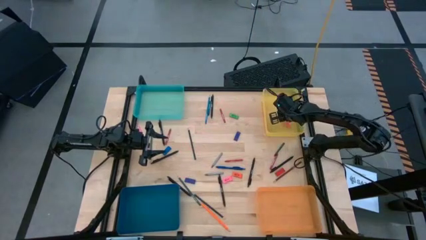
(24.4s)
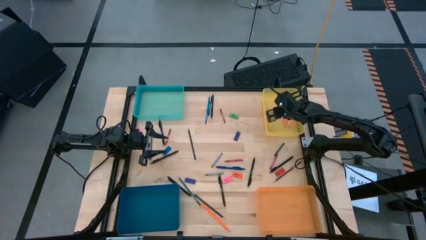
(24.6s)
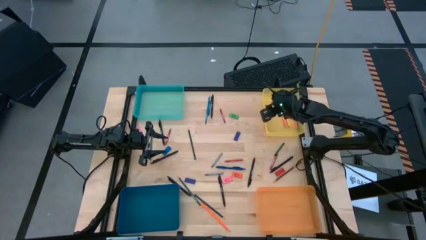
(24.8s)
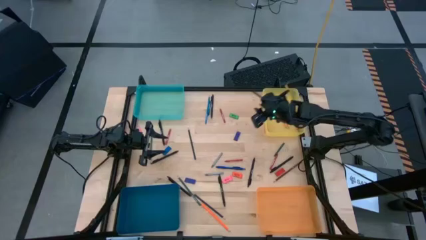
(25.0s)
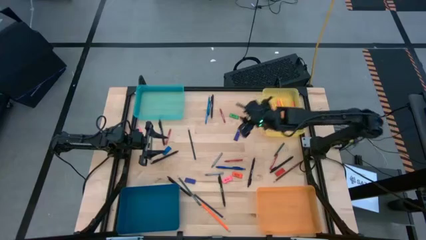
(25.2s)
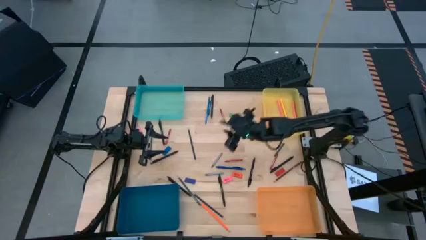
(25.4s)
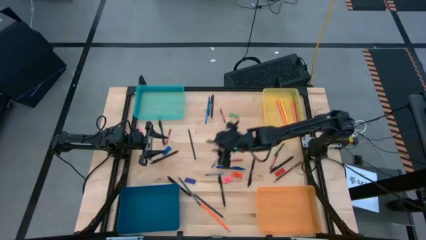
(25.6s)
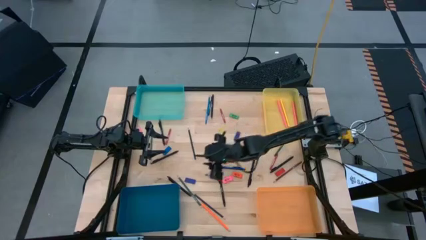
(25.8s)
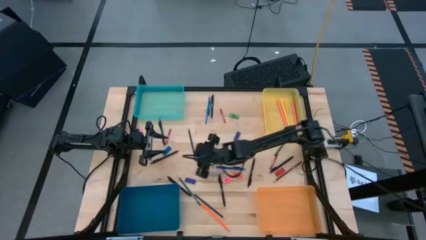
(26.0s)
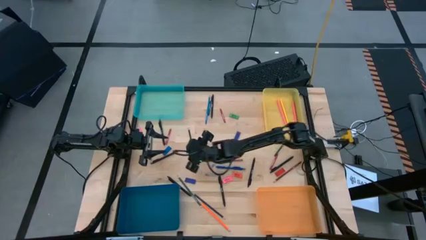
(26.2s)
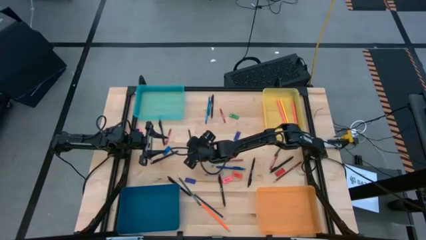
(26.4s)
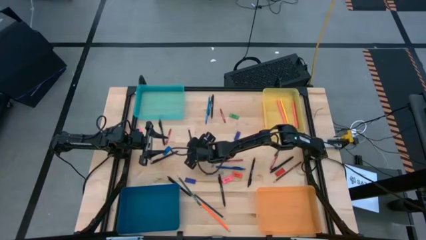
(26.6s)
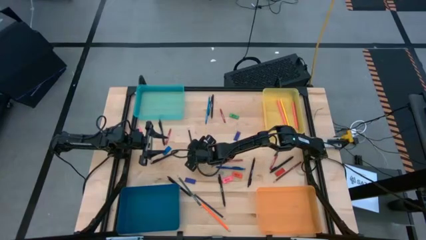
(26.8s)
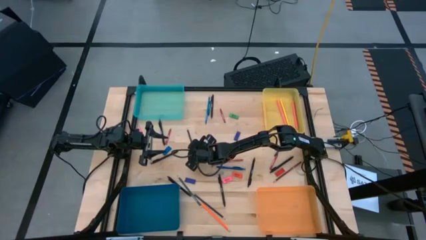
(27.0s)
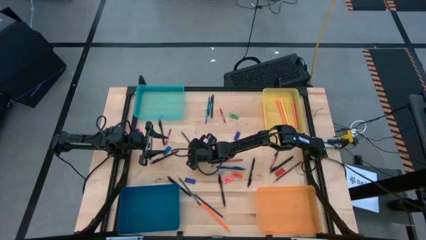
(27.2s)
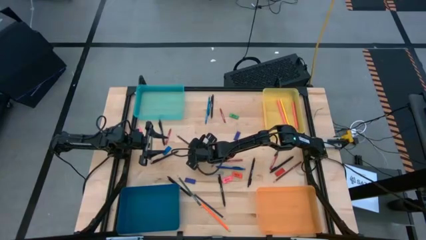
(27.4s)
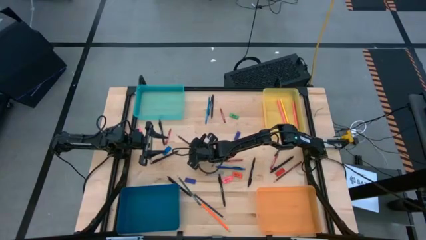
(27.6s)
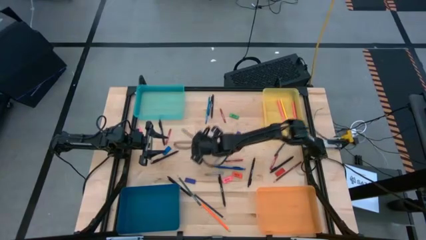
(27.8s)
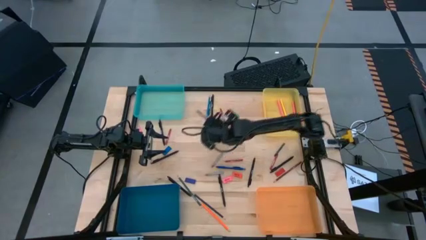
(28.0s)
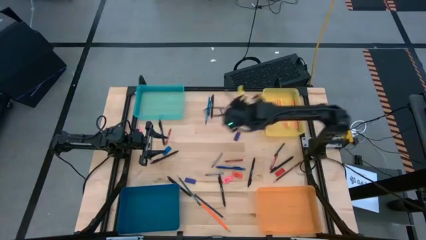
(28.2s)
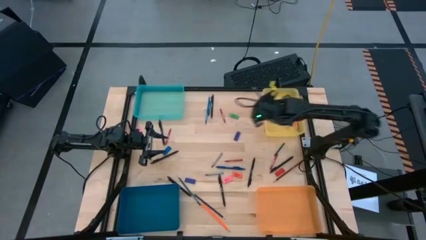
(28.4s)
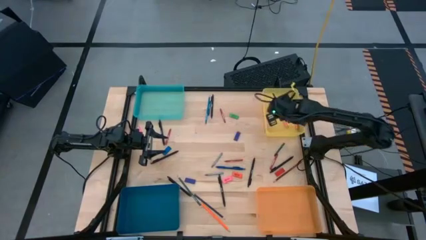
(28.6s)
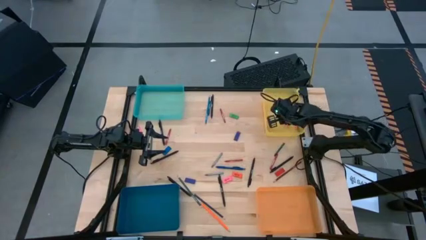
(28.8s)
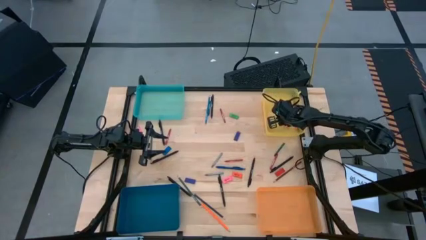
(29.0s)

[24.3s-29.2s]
Task: Sort crayons/erasers/pens/pencils in bins
Put the dark blue pencil into the yellow bin

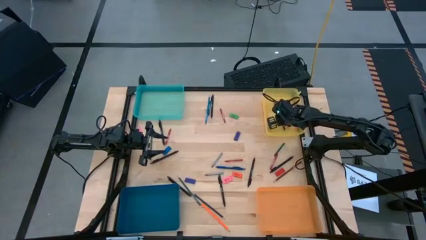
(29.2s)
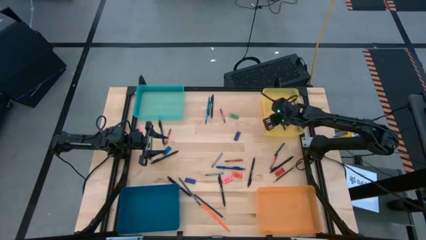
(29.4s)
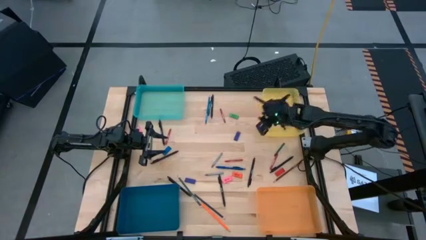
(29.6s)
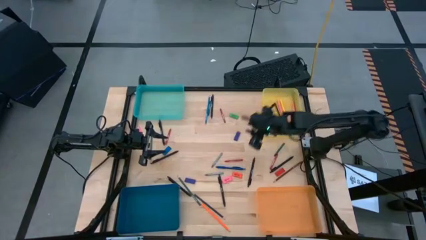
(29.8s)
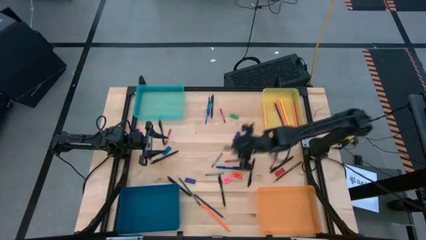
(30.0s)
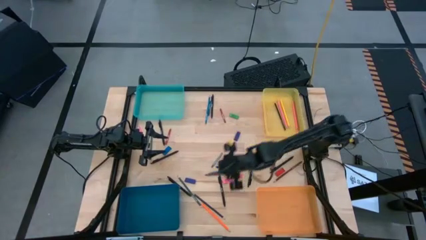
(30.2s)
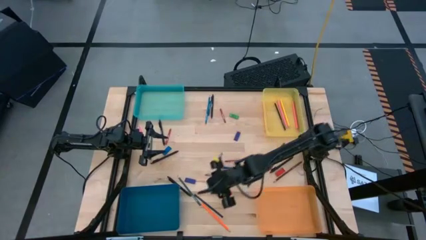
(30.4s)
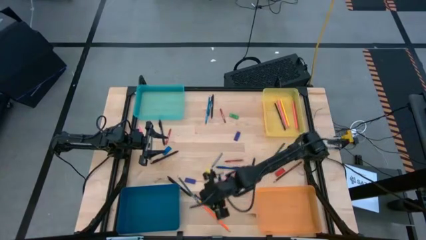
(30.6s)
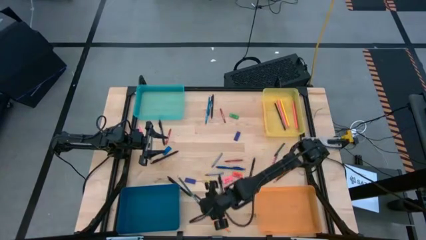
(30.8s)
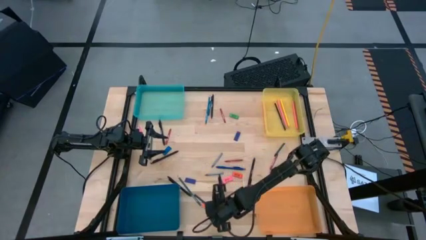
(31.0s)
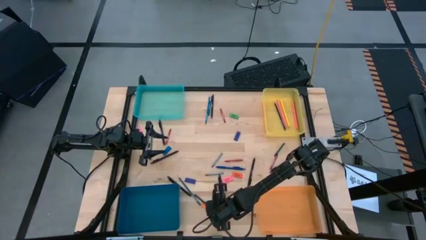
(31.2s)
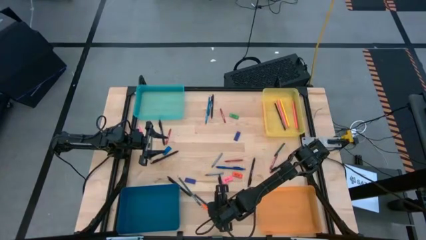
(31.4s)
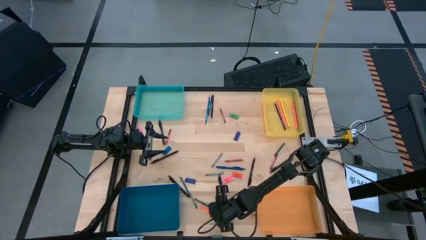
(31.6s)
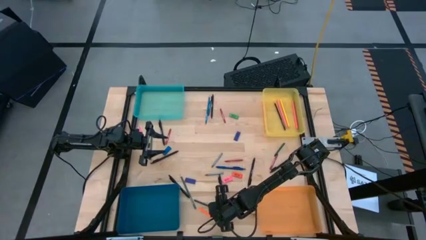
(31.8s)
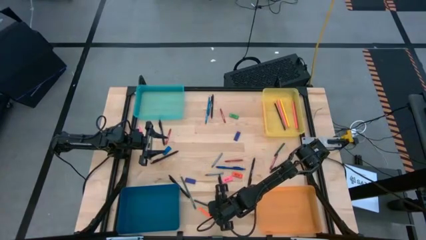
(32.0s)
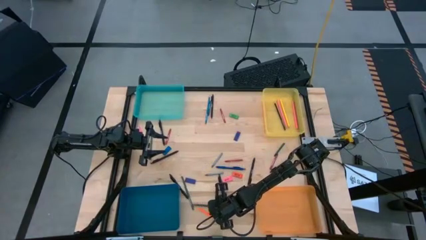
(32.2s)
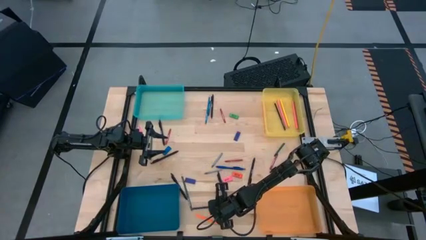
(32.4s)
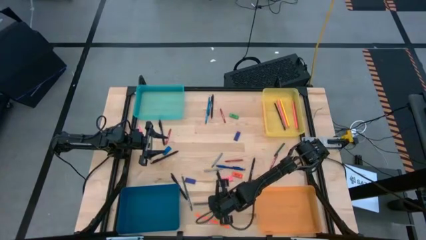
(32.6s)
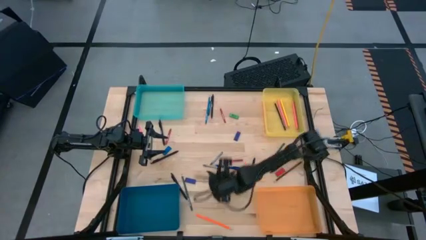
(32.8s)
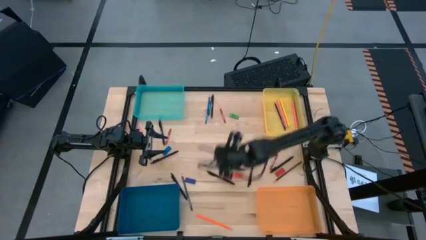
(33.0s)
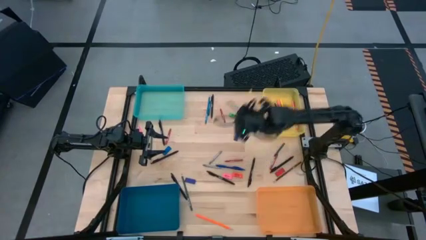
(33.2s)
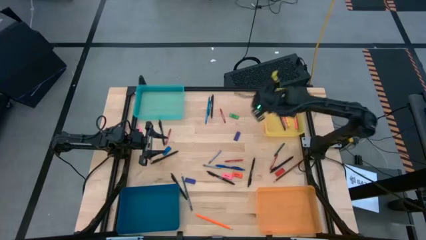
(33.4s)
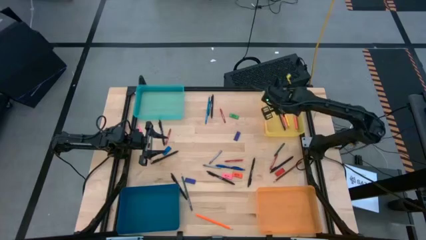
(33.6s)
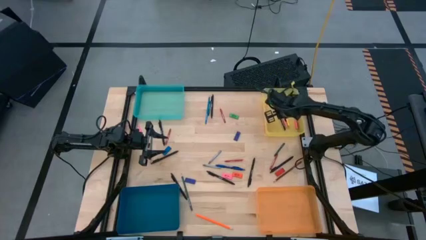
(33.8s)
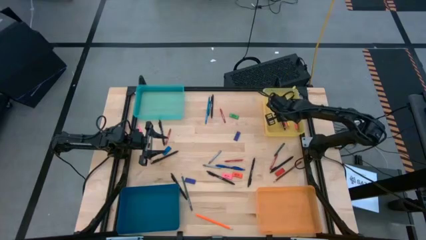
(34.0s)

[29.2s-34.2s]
Put the dark blue pencil into the yellow bin

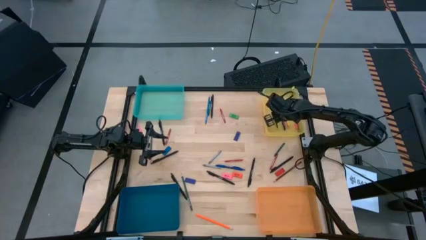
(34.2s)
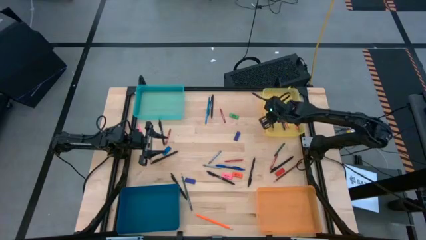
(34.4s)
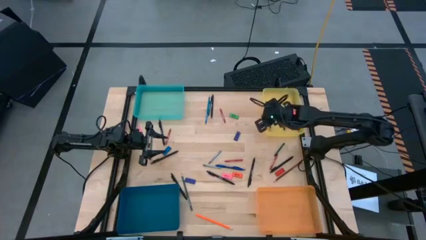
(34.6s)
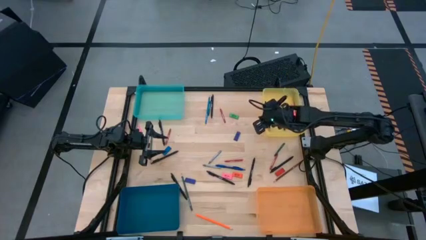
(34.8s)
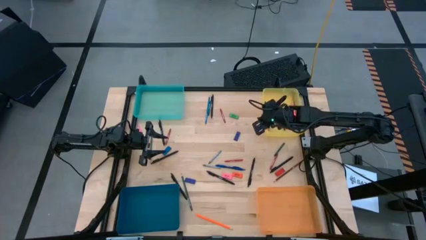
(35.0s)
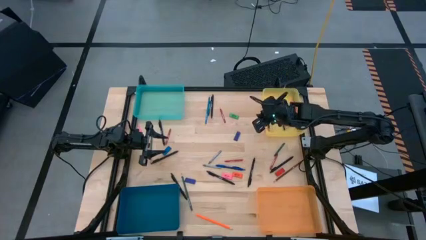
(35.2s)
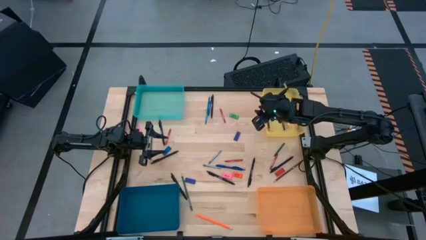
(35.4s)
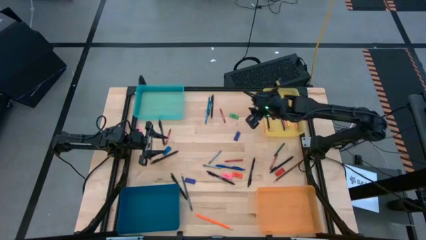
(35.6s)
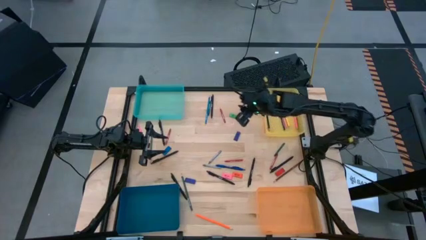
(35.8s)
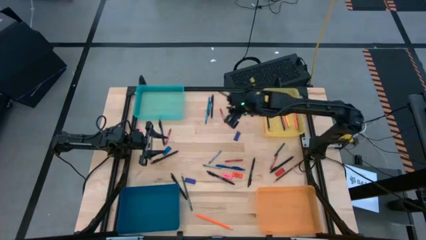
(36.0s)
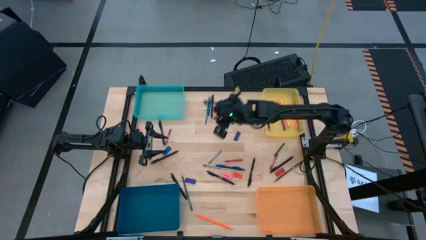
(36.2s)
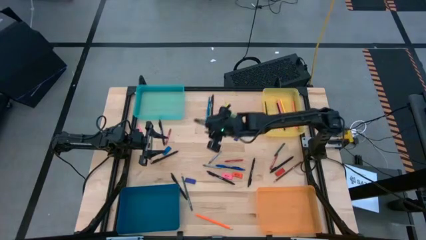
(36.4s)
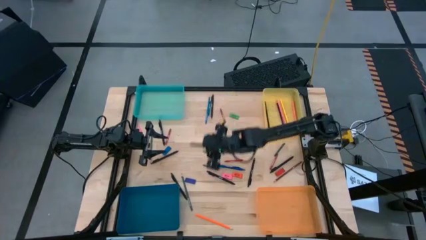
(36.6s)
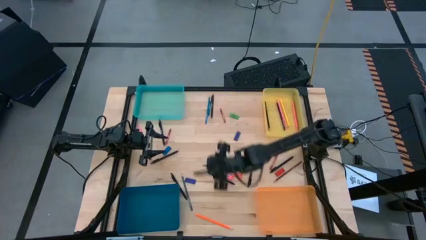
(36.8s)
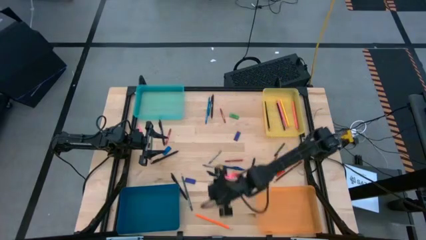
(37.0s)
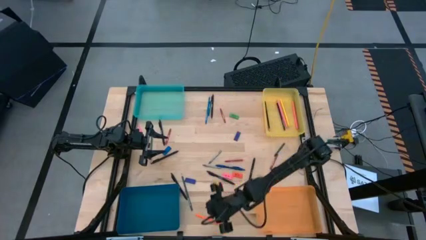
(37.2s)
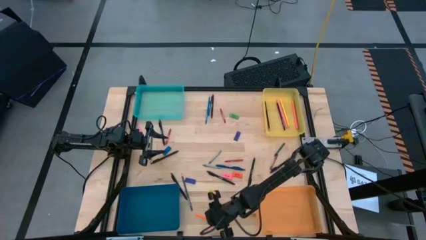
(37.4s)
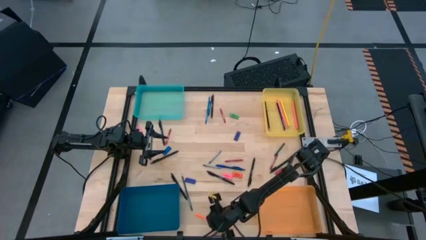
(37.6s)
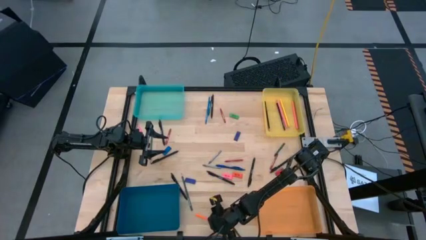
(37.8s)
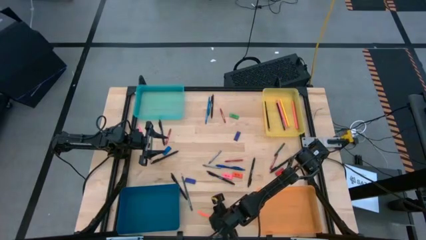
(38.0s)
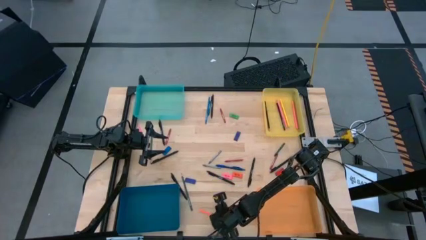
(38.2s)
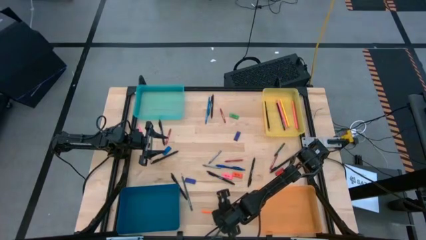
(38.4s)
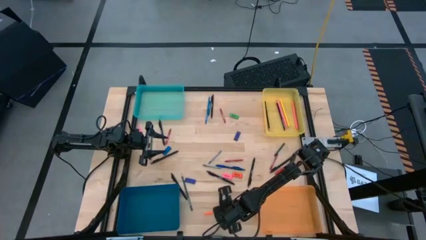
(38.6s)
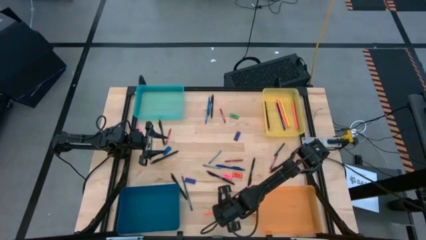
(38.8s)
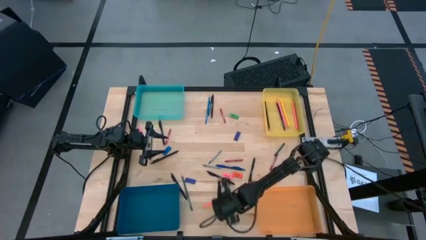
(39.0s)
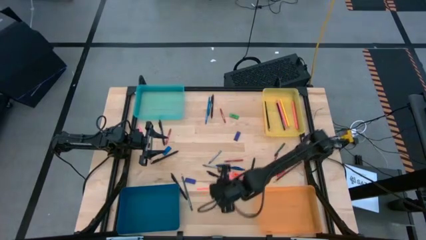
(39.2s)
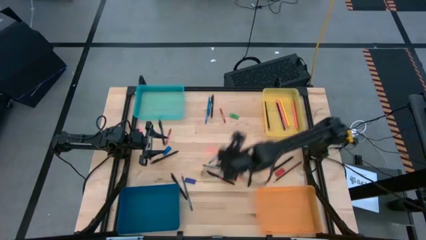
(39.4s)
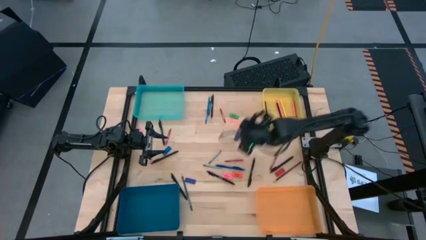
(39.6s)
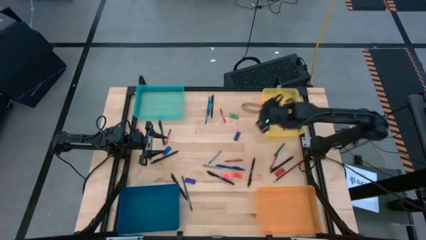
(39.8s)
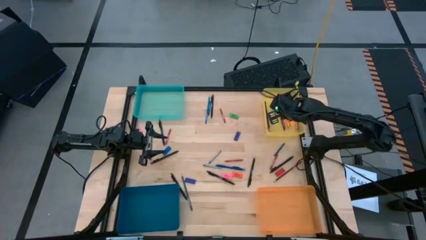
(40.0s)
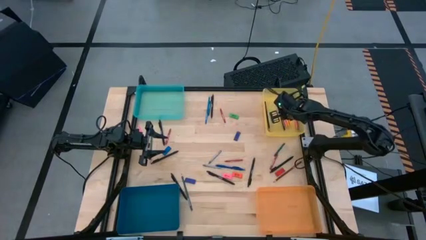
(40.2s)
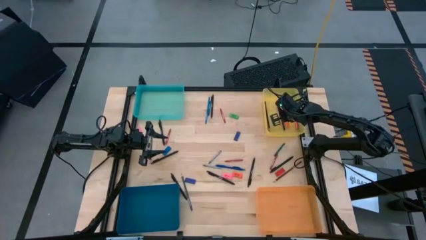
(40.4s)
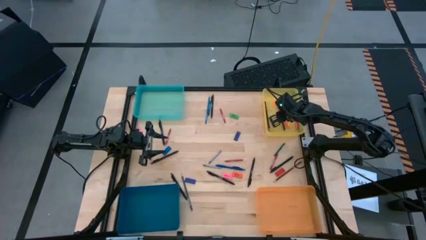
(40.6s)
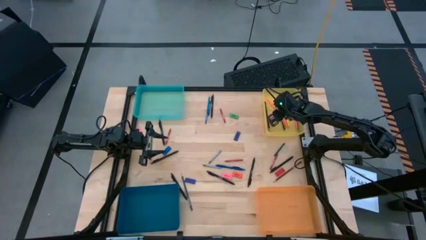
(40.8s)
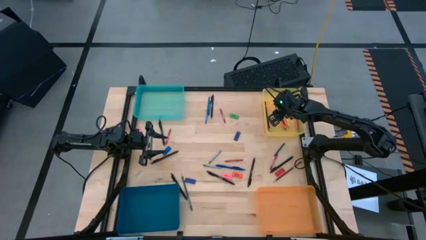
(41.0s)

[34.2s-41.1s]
Put the orange pencil into the yellow bin
